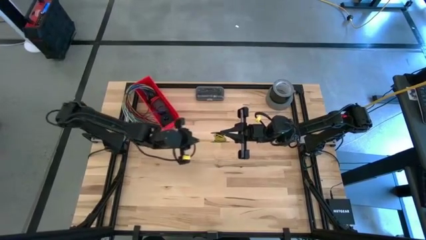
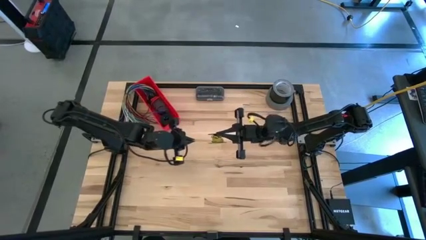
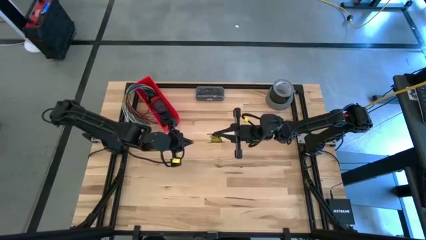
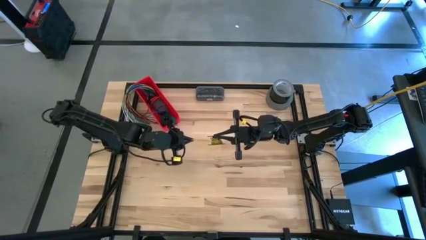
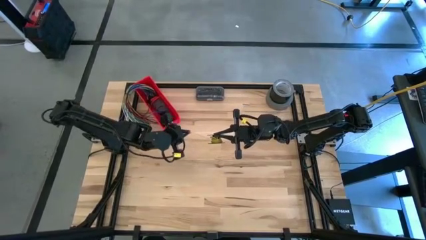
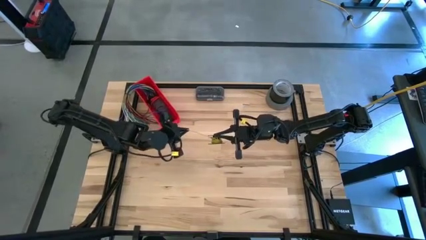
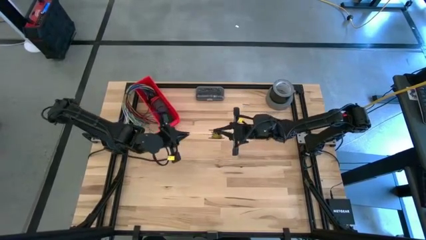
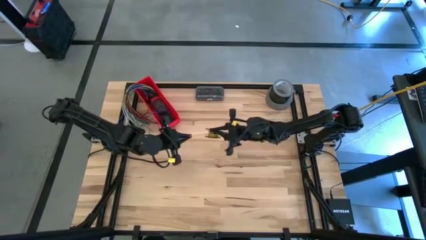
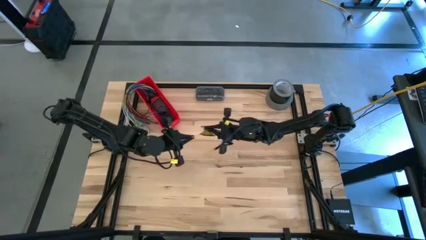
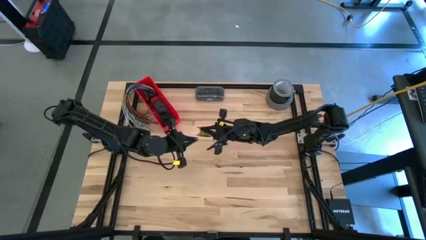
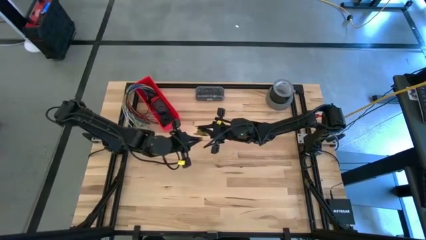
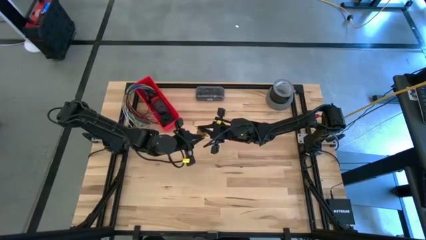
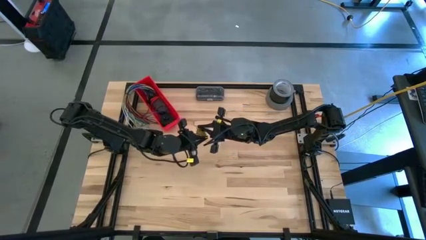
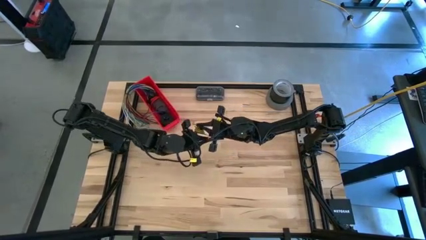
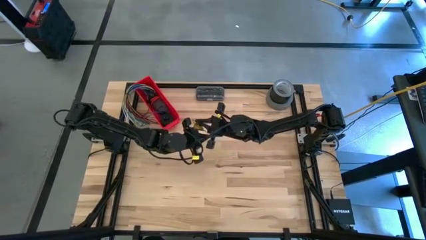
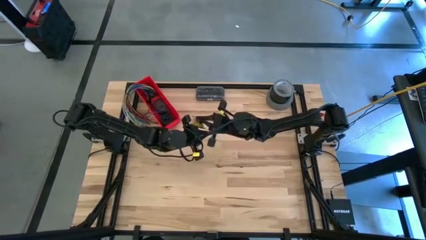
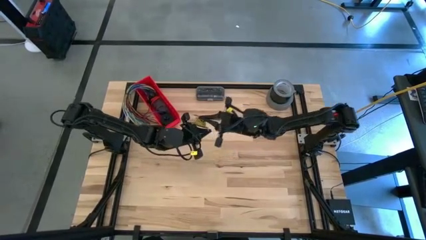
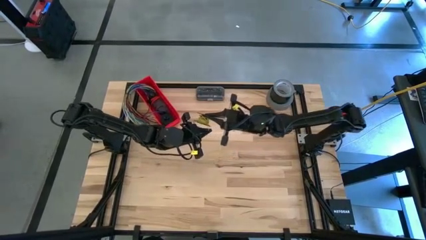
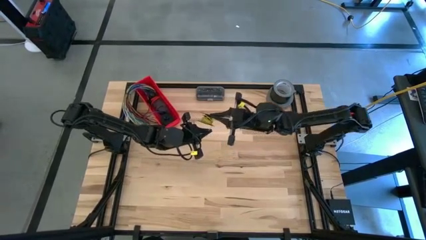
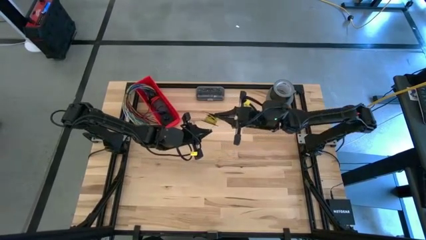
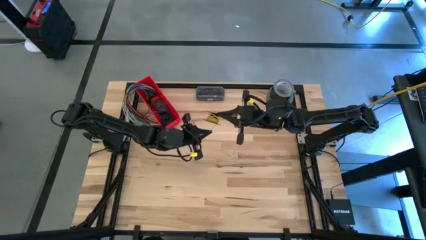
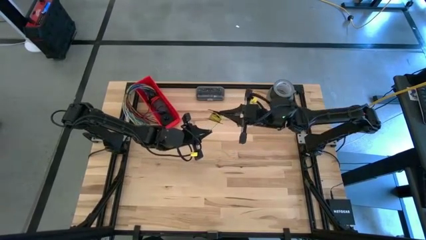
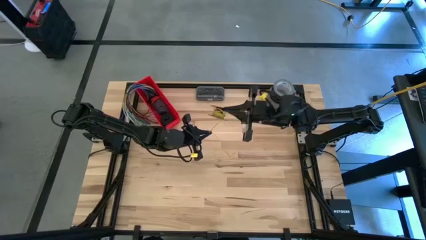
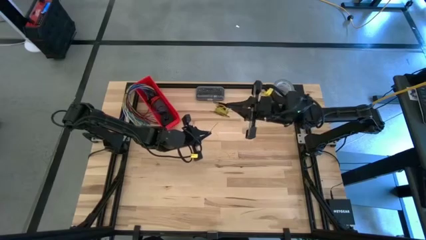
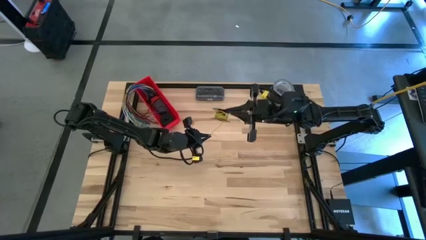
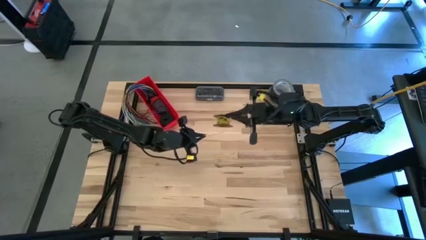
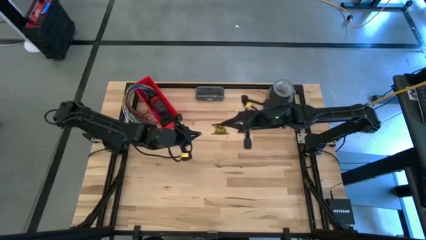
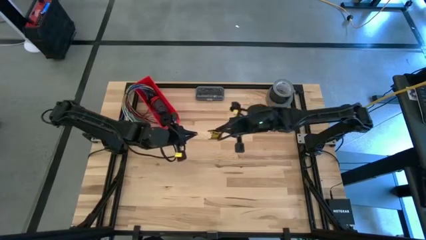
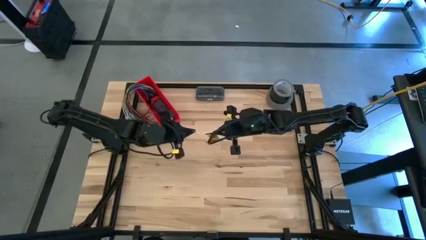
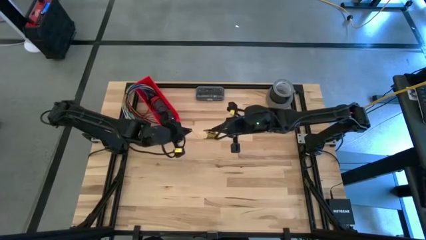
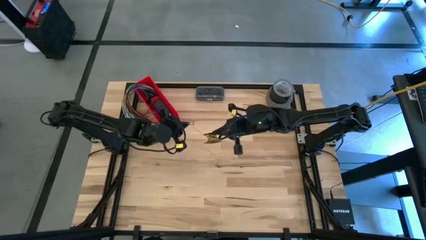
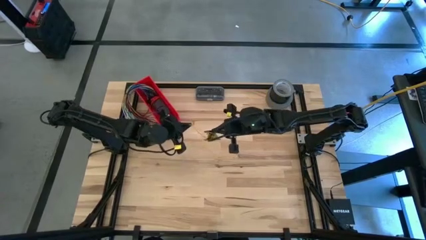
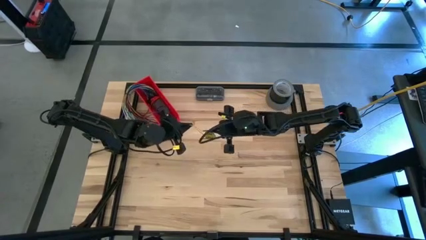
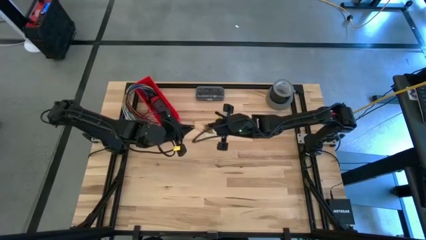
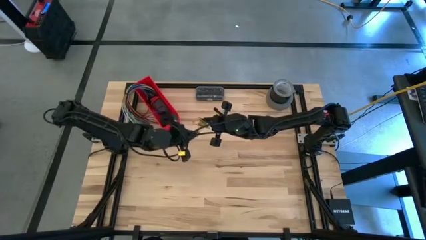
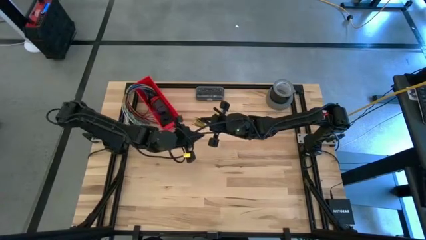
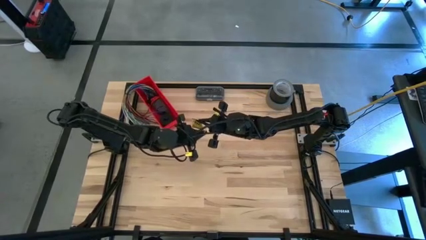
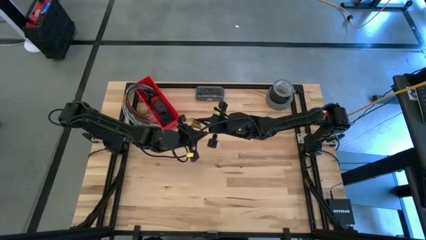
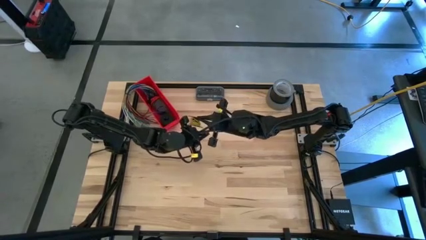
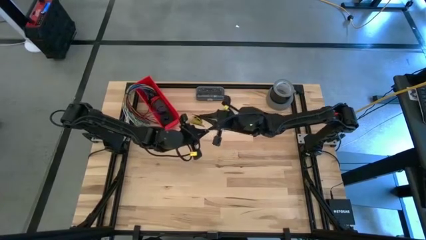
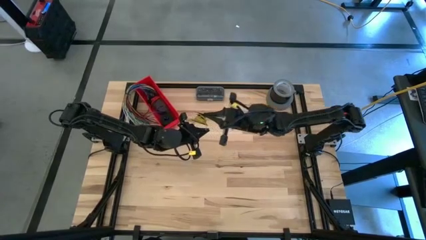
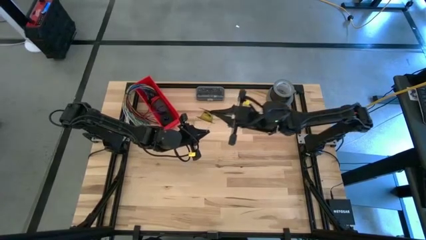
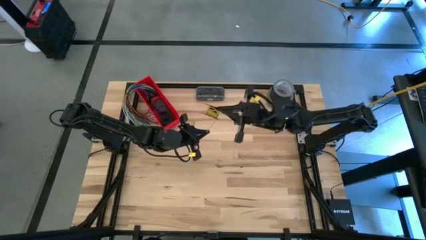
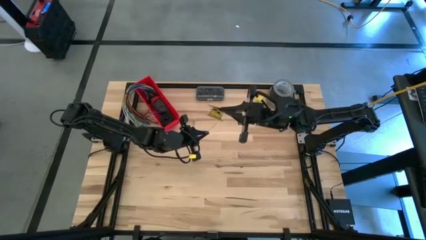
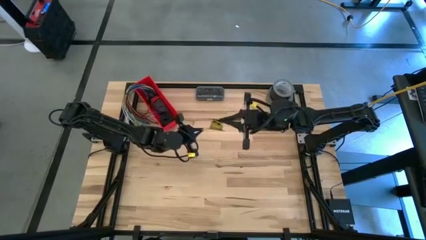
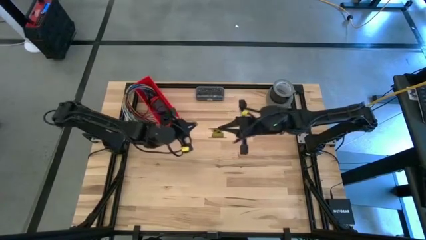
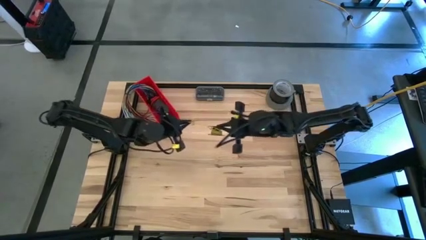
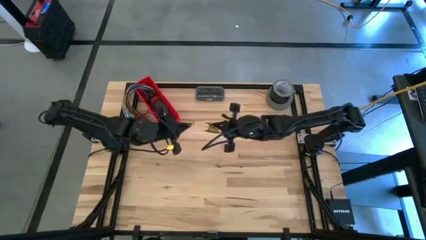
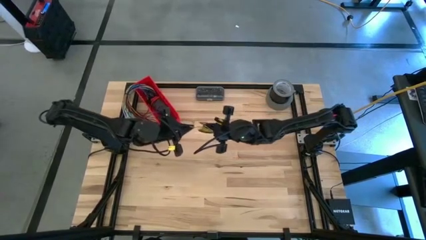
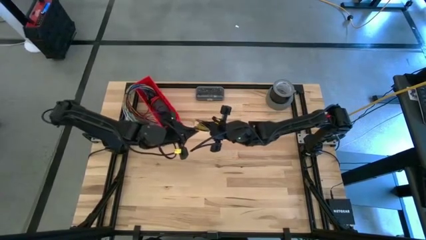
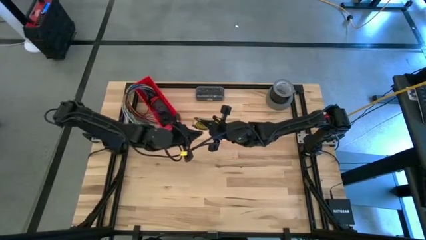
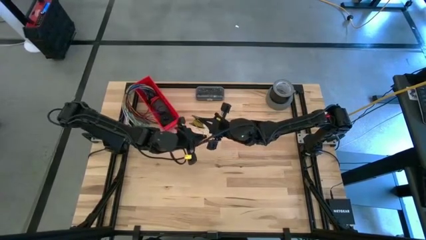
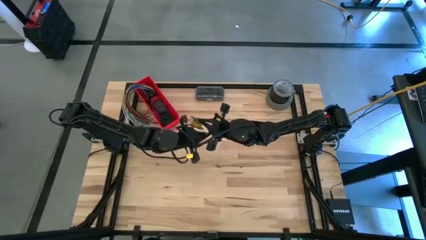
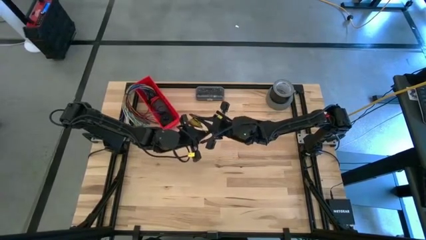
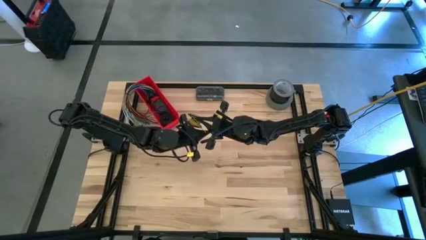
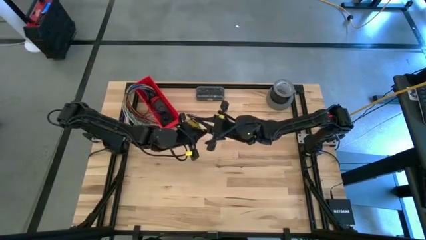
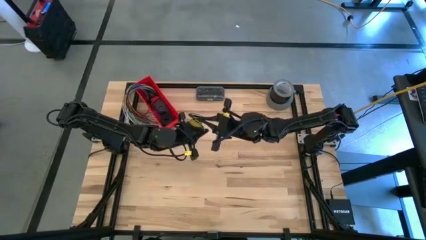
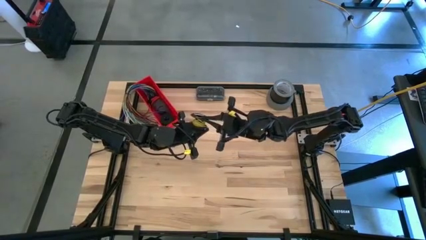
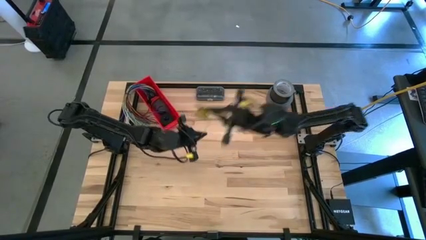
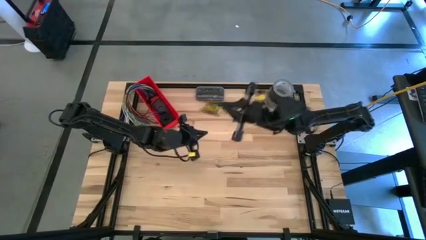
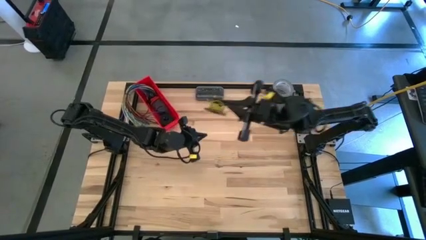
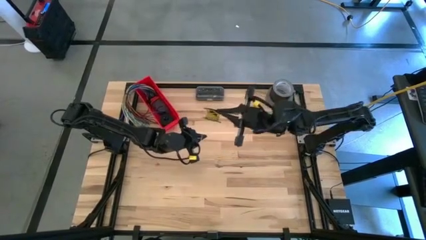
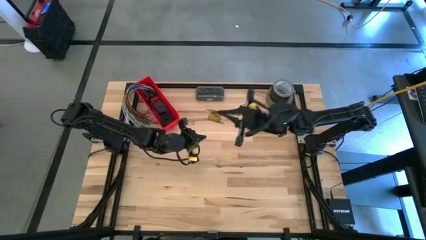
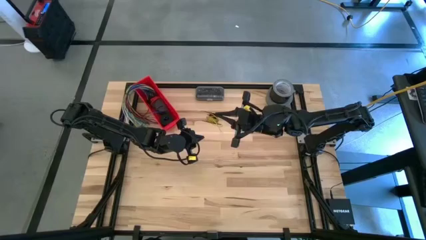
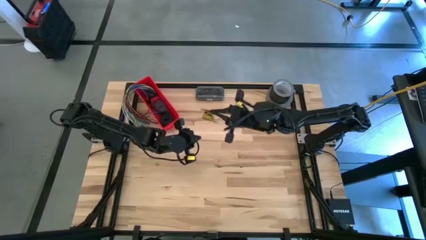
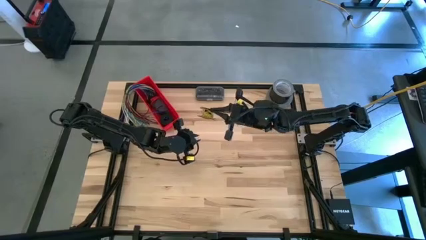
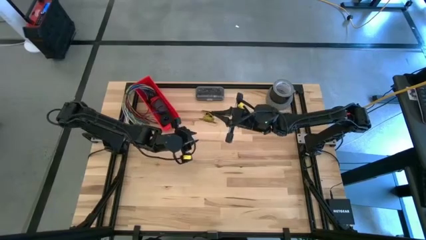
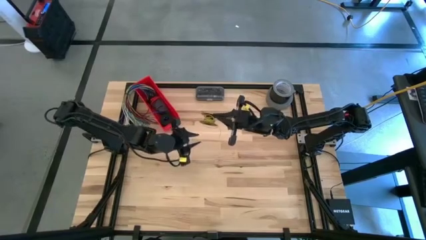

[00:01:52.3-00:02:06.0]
Task: Coil cords
Coil the yellow wire on the spool
